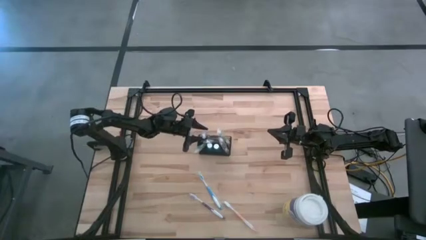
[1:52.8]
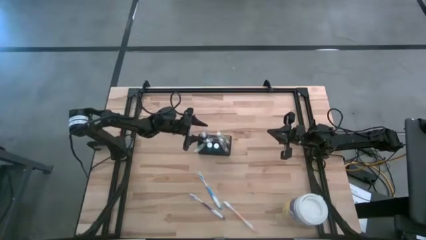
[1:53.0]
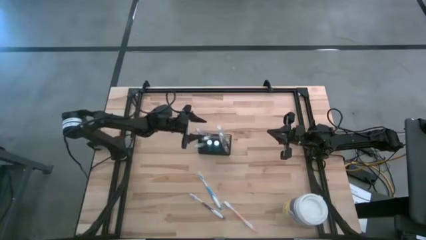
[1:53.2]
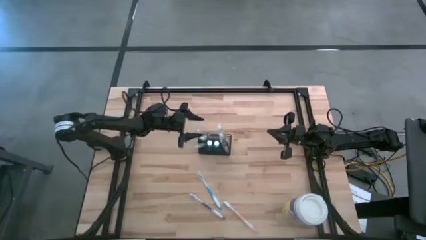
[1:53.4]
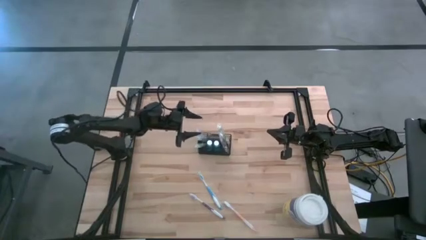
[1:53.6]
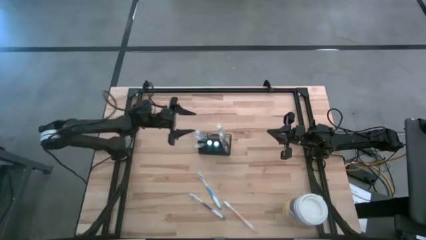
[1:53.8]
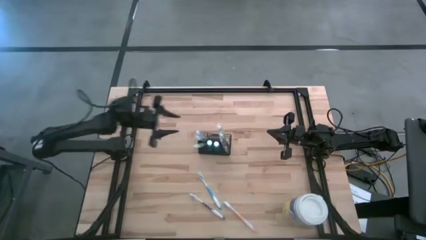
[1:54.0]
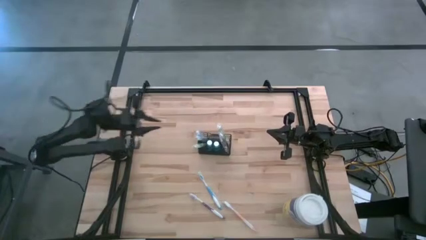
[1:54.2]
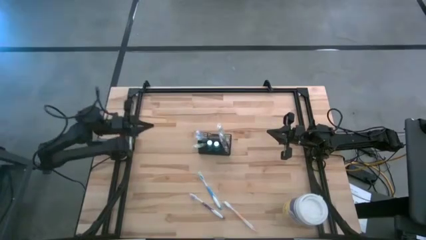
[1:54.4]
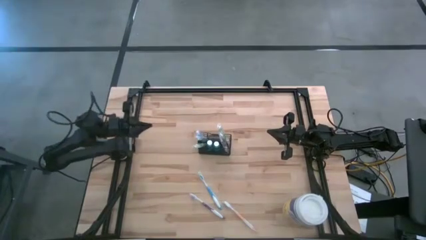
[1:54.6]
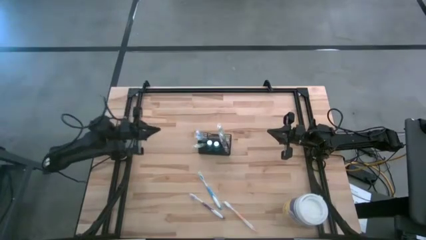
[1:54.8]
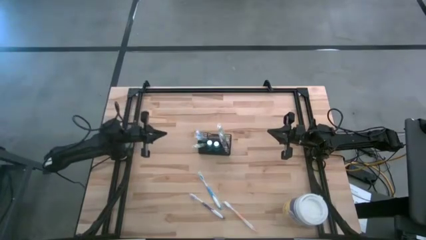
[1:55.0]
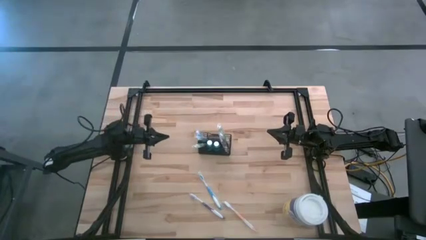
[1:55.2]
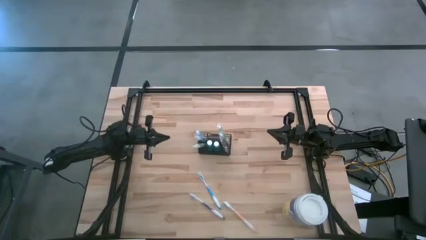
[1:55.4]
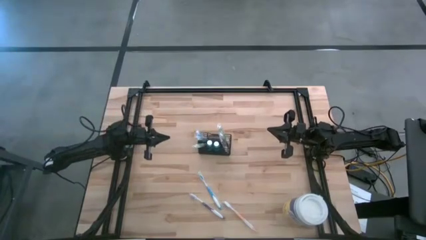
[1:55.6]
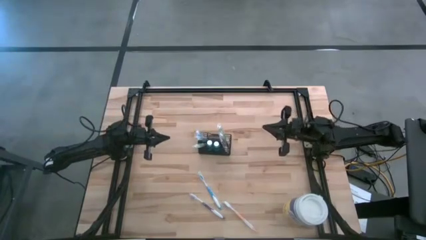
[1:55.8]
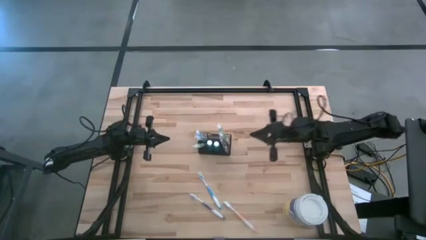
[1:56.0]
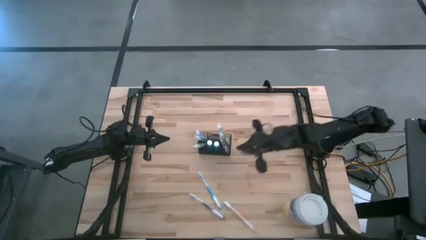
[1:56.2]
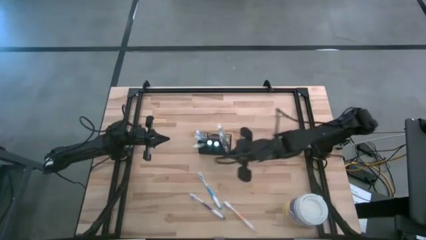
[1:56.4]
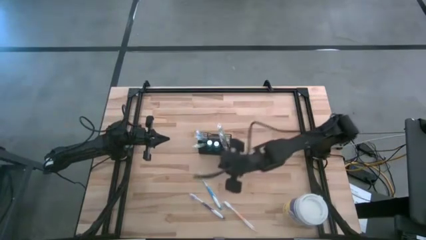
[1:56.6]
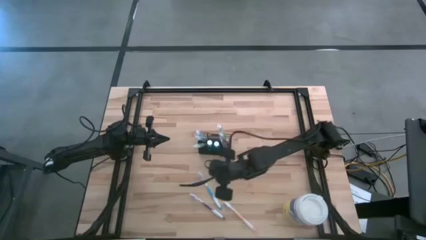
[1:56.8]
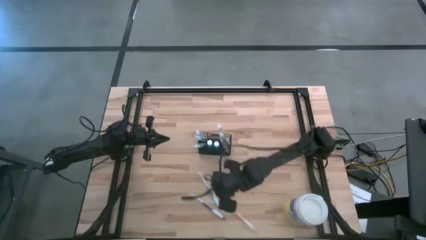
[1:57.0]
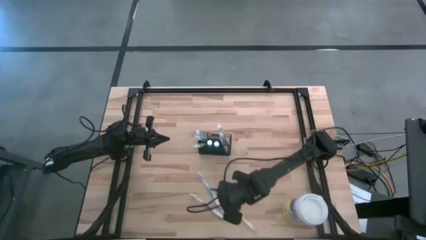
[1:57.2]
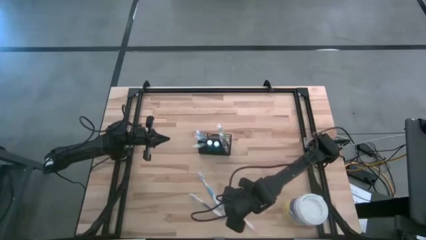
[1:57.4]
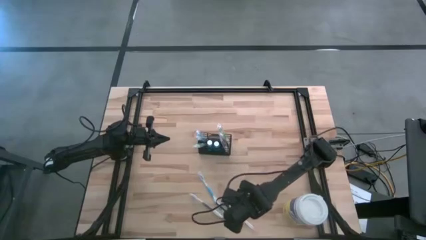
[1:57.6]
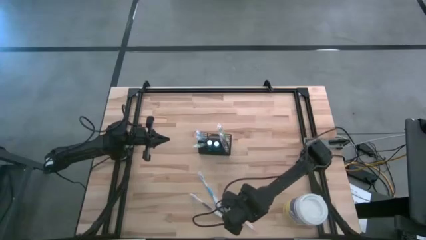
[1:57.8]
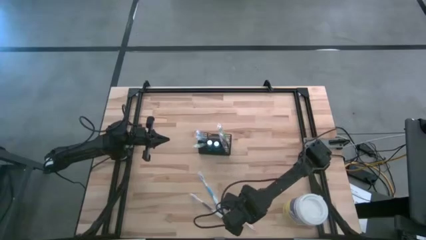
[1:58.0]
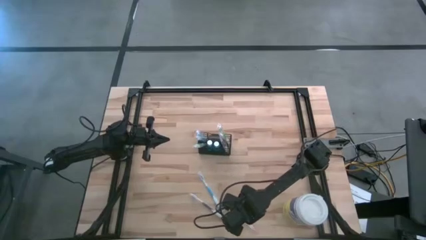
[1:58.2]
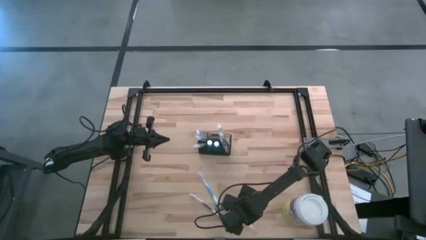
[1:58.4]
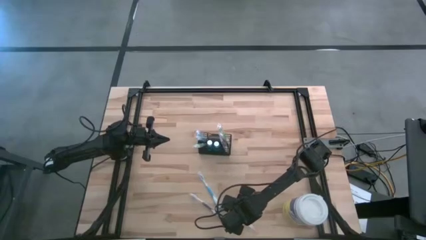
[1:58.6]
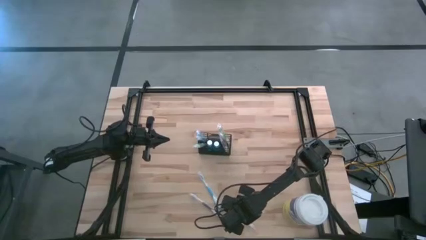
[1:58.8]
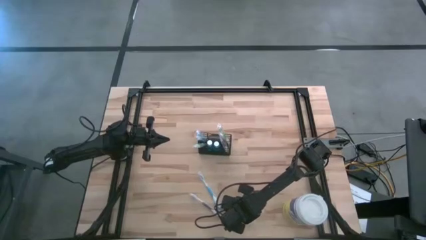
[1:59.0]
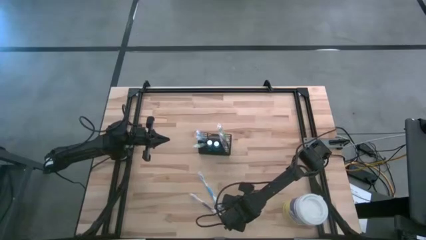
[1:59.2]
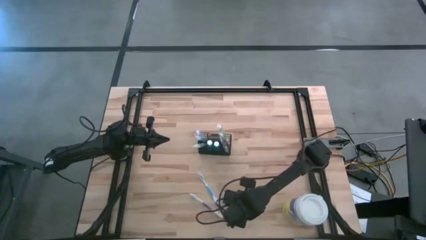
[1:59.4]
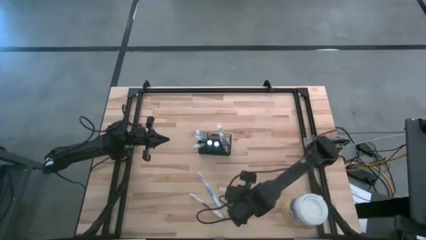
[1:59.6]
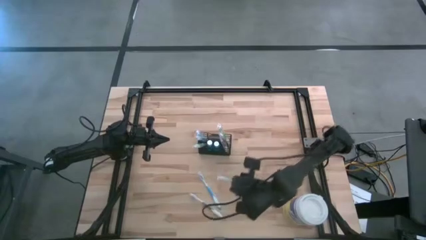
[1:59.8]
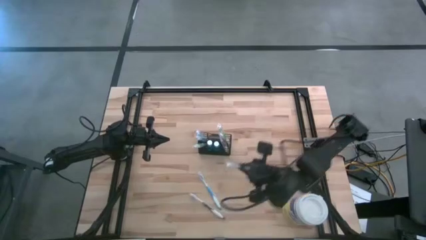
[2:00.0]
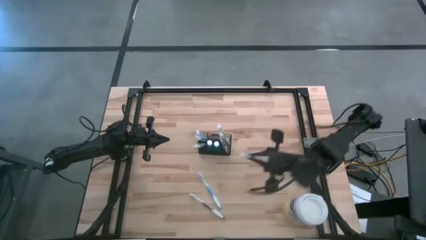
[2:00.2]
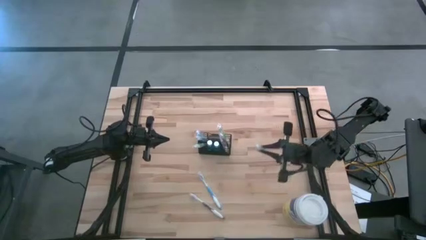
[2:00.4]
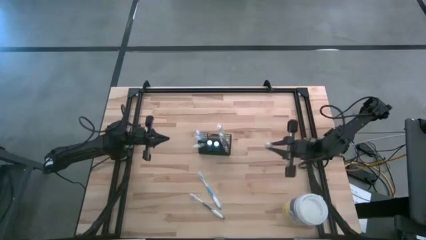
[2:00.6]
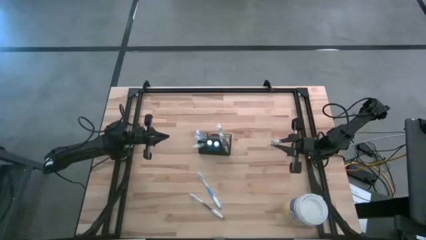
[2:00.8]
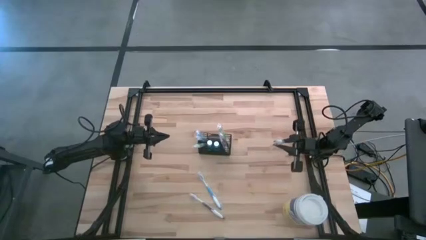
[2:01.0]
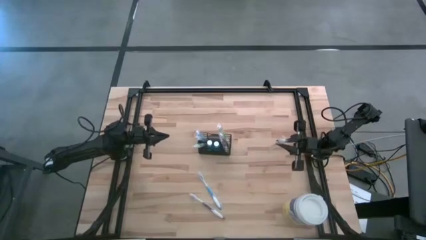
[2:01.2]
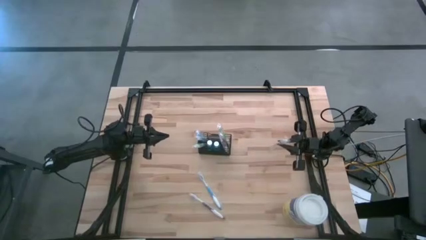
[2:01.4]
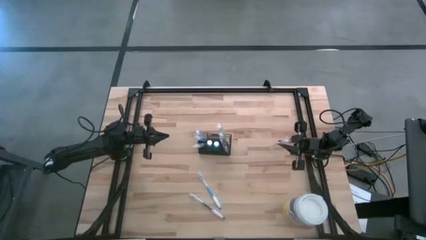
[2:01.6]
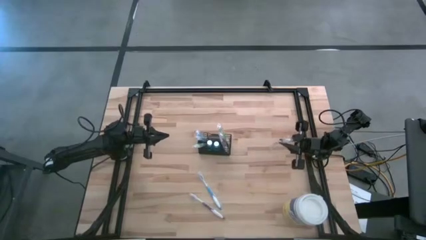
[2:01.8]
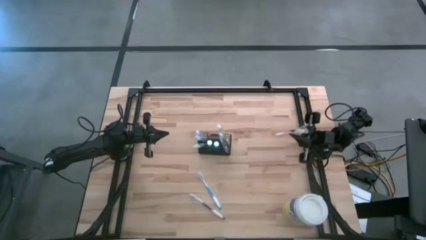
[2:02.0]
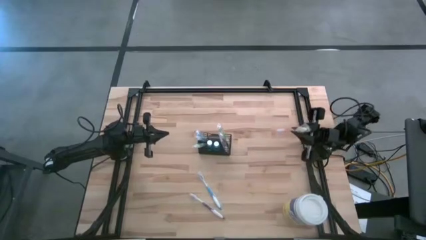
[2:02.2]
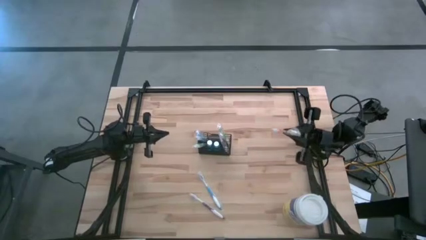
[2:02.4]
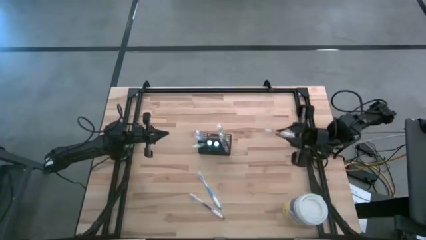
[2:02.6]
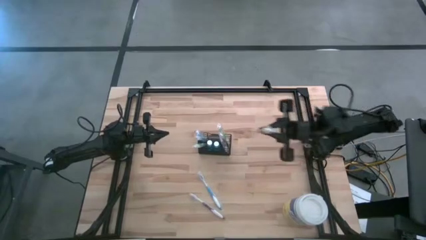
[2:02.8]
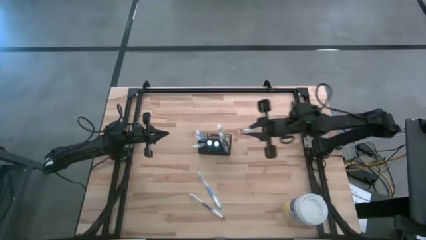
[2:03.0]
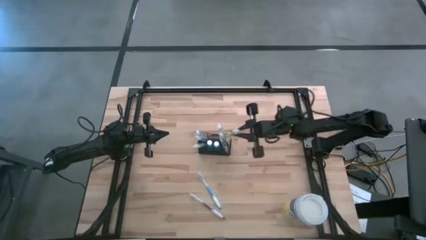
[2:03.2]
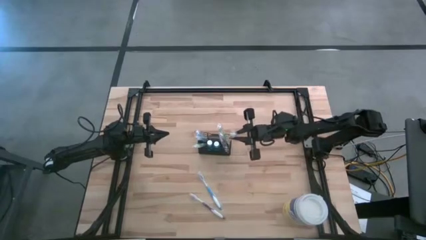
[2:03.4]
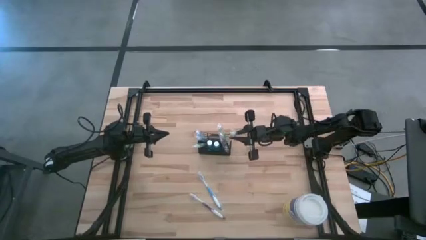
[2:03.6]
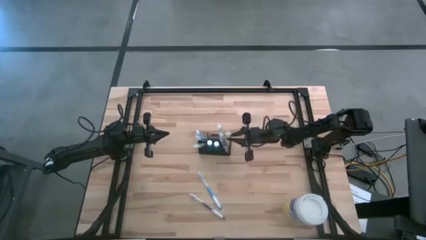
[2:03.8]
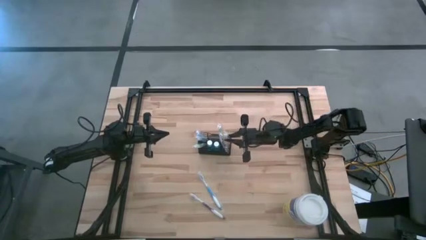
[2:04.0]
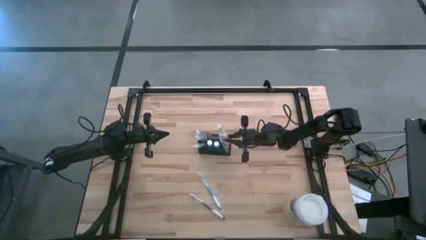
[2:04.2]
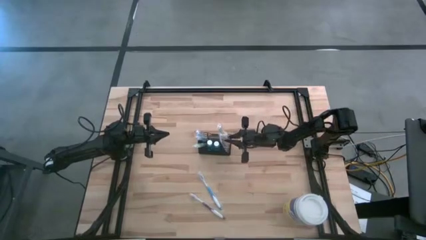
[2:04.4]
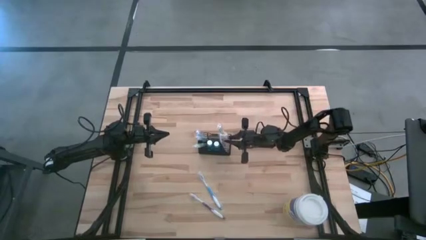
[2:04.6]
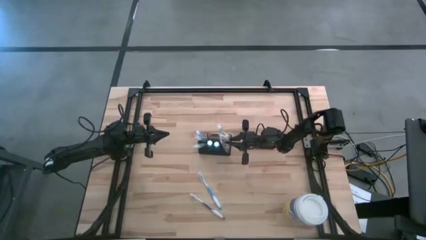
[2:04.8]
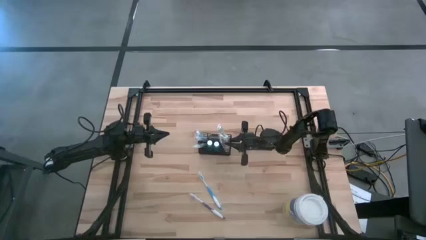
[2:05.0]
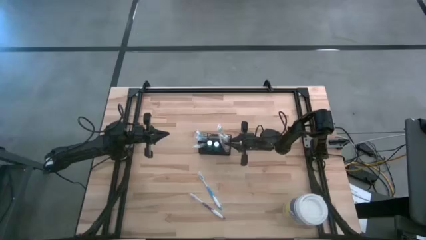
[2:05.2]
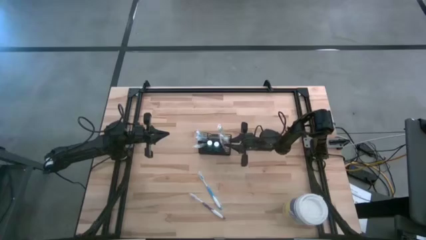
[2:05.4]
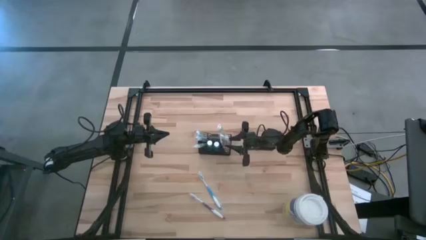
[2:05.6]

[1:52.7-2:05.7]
Task: Pick & Place toothbrushing station
Put the orange toothbrush into the black wire organizer
